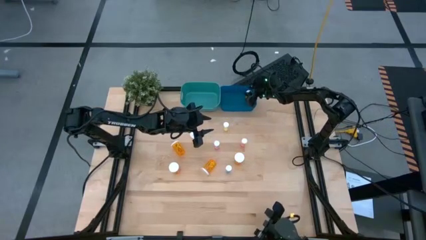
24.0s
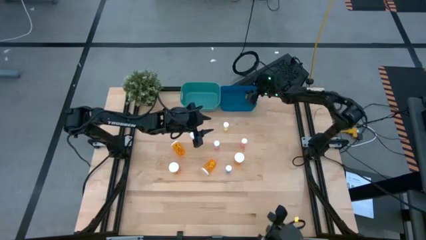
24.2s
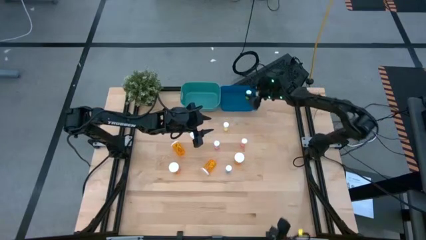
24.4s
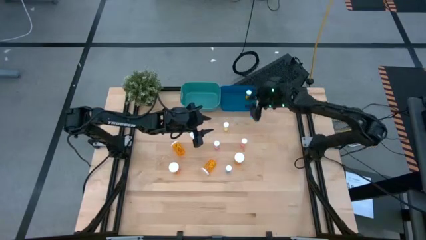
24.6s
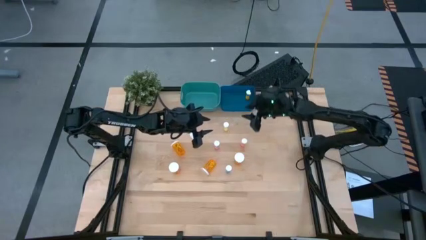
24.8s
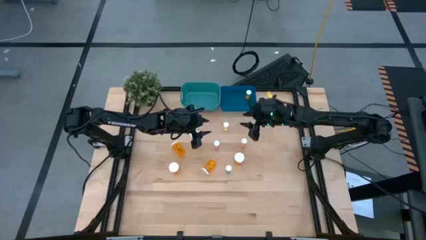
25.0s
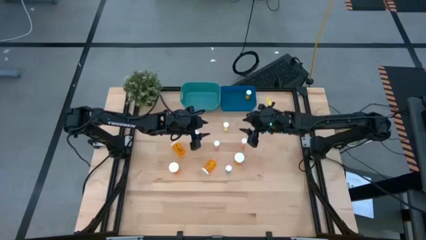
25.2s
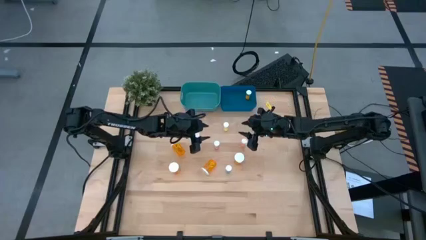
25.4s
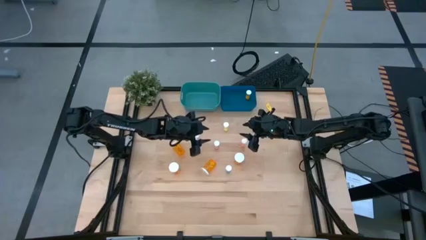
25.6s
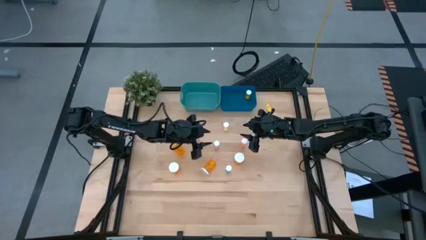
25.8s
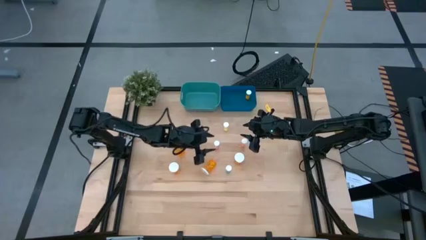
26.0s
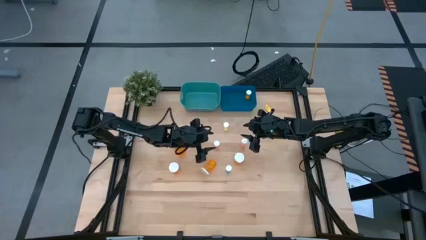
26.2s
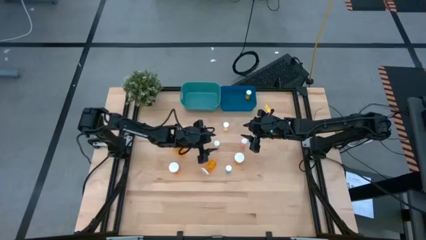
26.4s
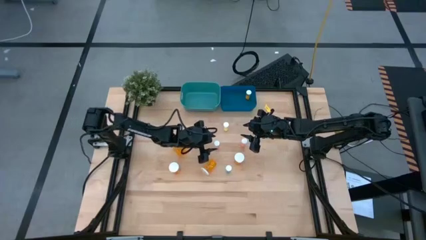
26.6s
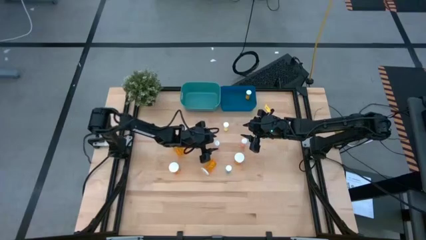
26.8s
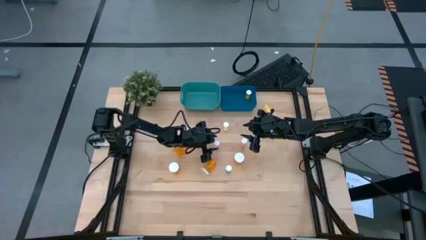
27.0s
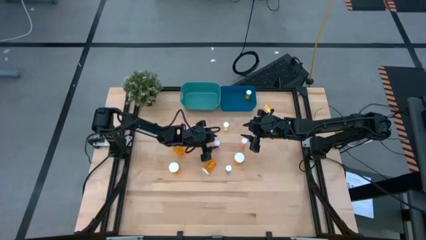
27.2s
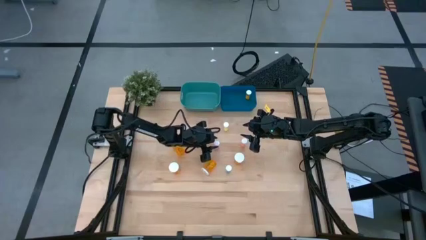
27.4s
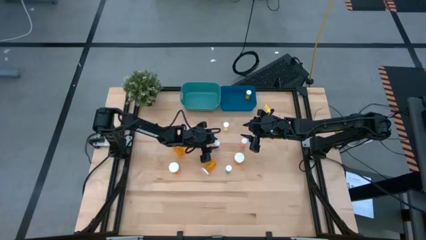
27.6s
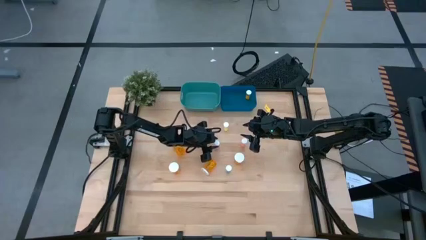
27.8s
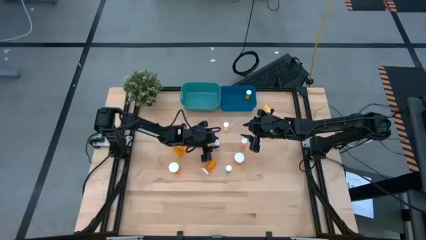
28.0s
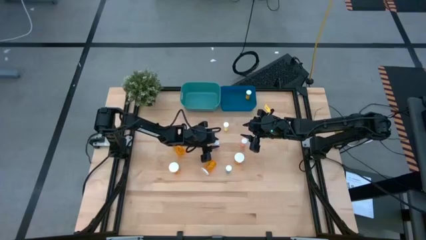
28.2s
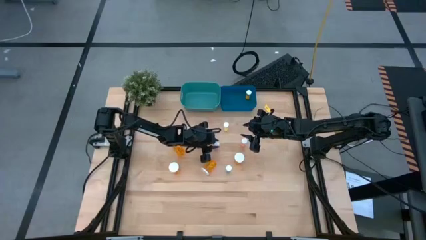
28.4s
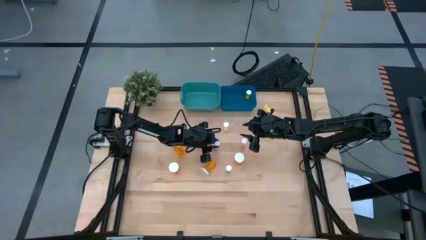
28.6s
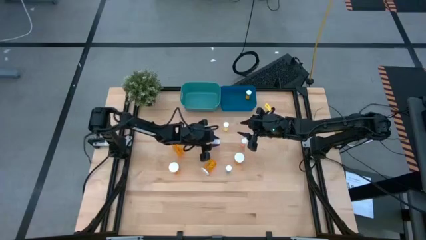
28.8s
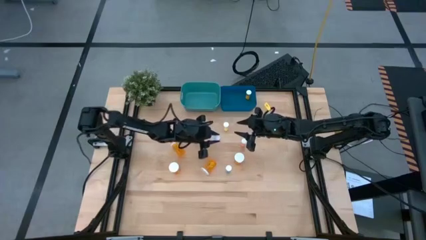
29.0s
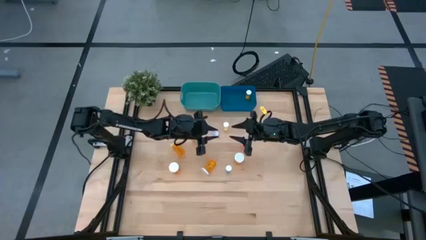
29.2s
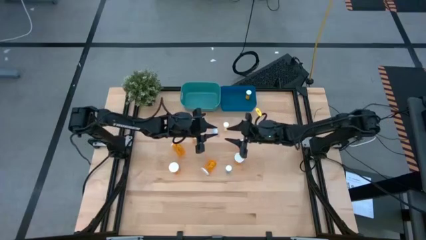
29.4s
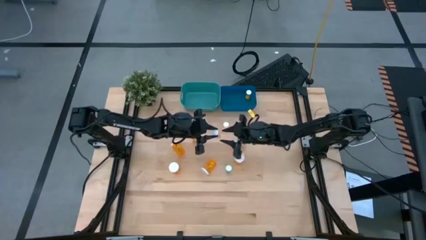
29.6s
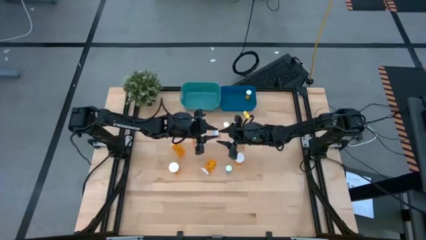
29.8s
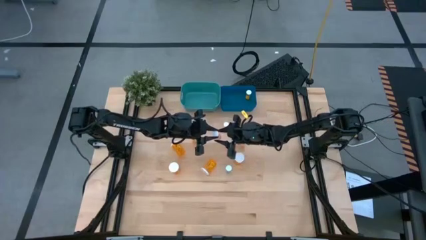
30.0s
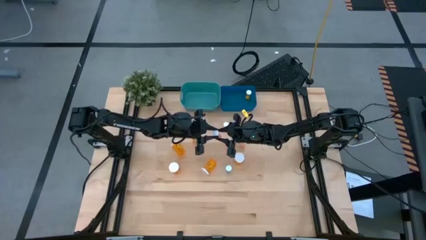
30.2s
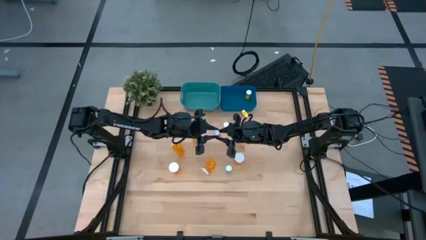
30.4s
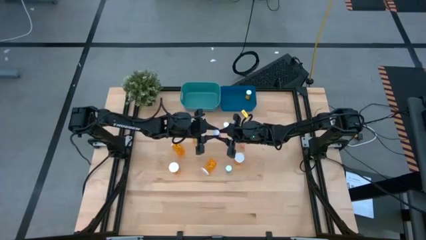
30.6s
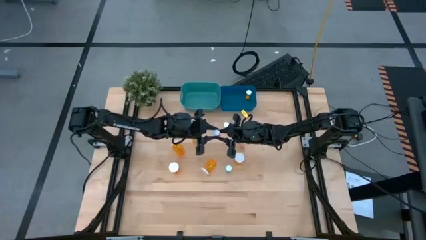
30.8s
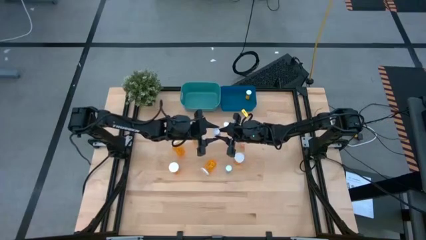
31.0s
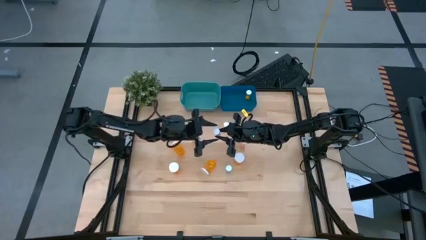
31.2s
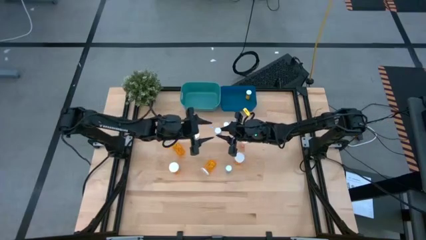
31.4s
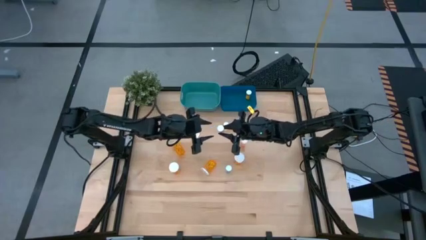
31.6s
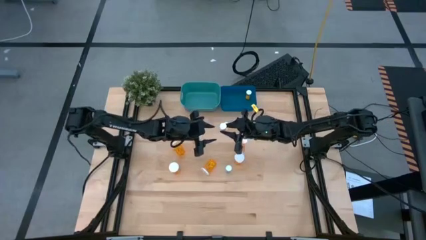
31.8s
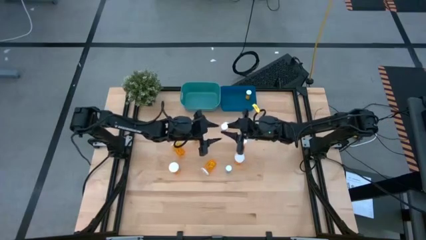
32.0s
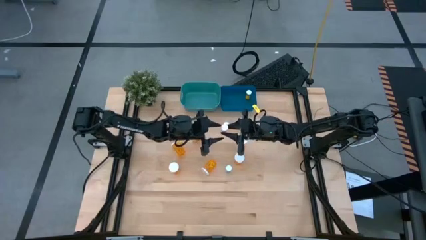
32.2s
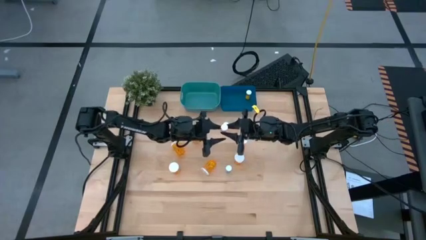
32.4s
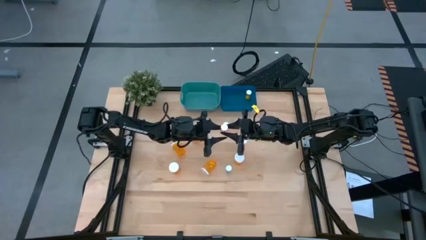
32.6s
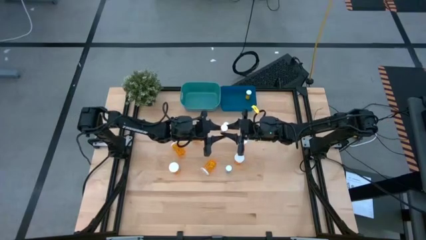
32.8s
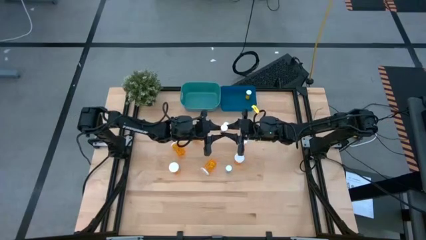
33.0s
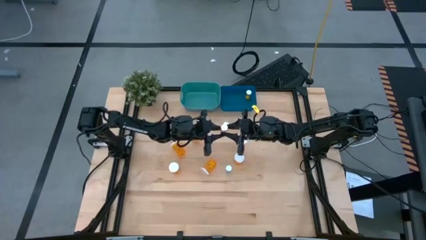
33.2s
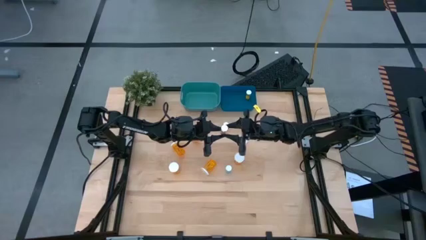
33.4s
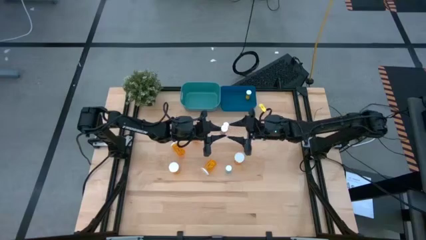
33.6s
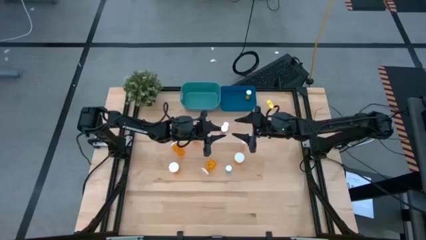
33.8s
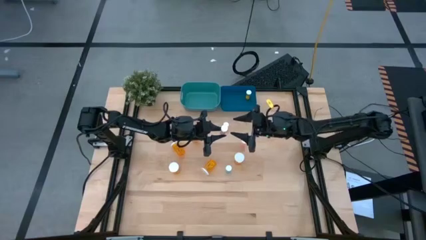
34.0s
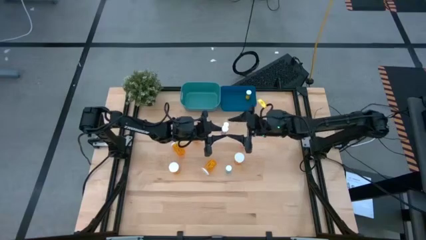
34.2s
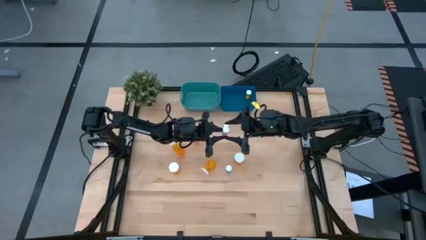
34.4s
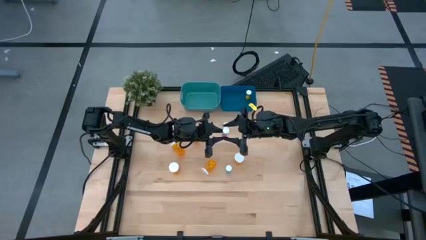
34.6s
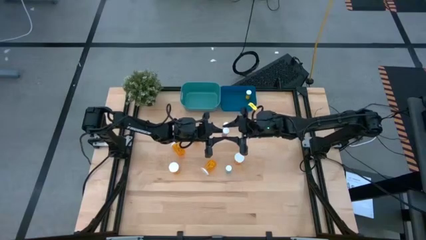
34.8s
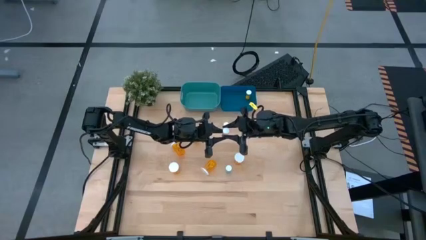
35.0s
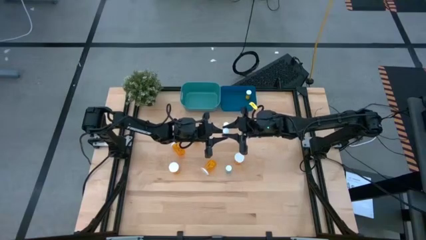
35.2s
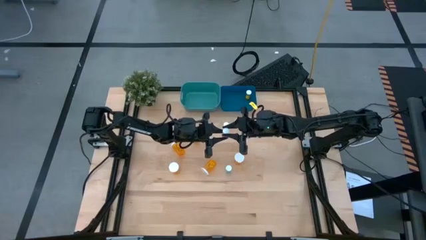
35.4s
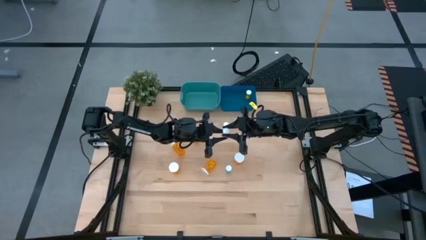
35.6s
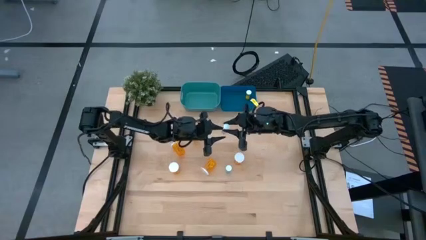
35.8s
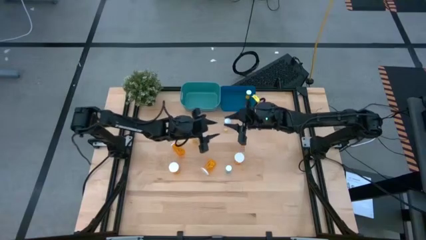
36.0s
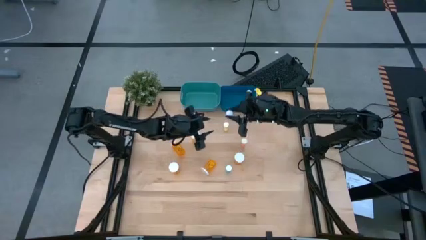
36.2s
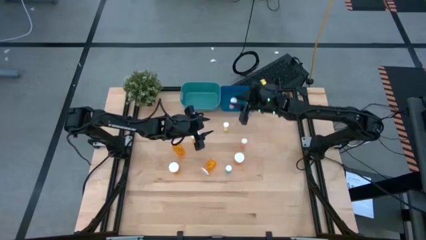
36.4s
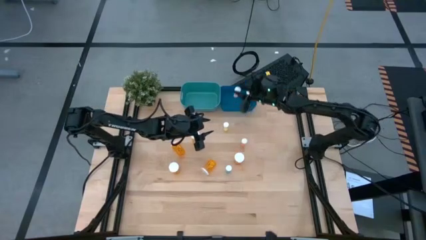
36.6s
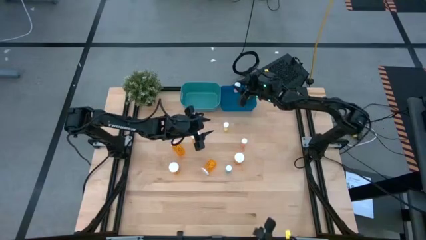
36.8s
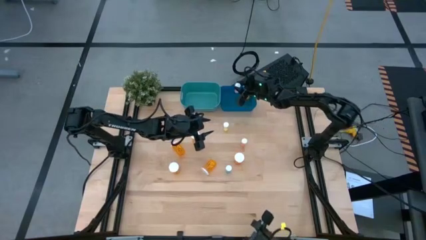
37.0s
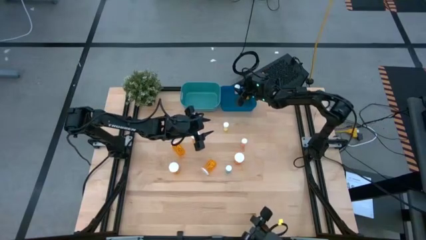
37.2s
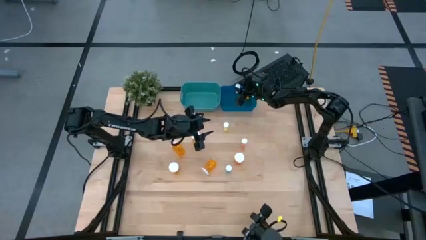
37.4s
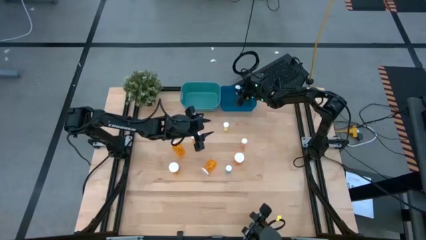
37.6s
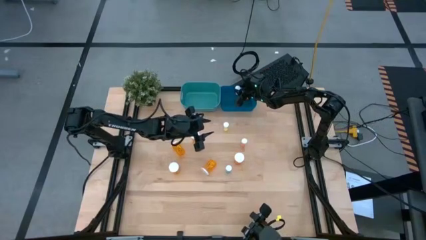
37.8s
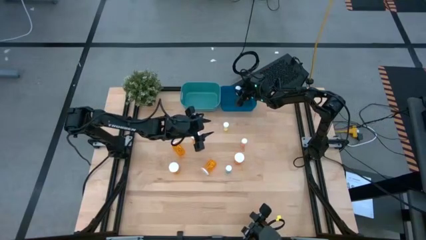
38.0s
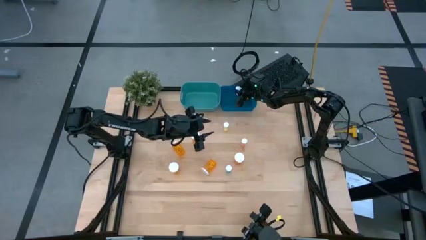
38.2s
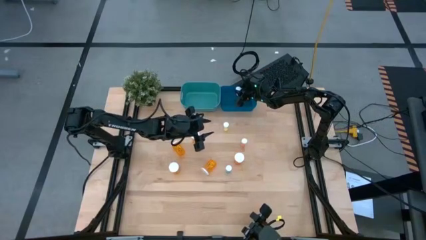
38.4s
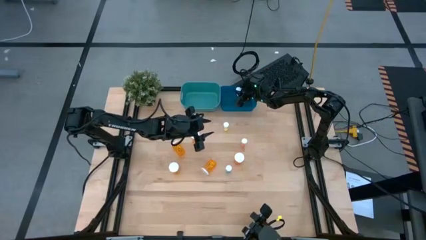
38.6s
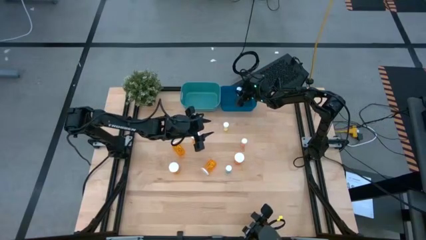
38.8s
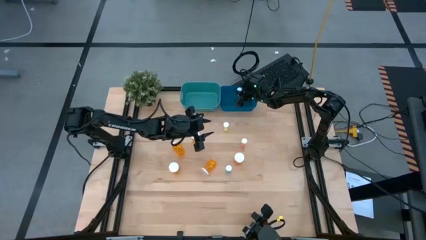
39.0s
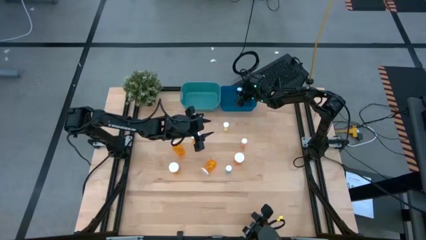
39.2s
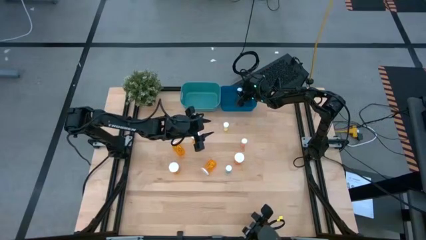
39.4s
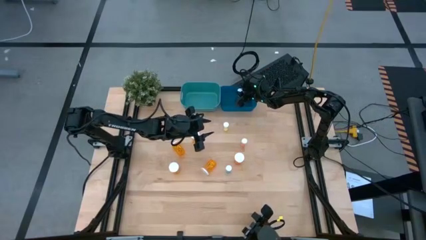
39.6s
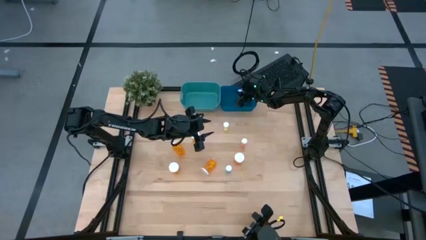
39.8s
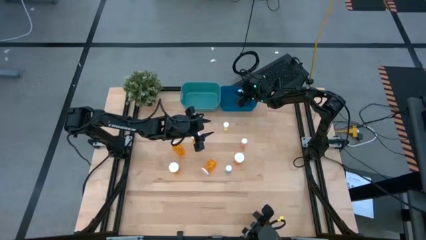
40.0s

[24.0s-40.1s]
Task: Pick and place medicine bottles into bin by pill shape (circle, oval)
Put the small pink tablet bottle into the blue bin
